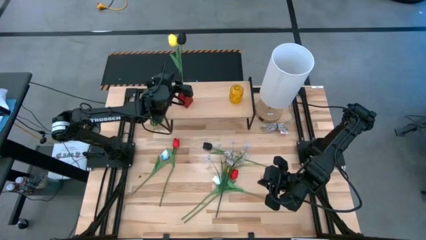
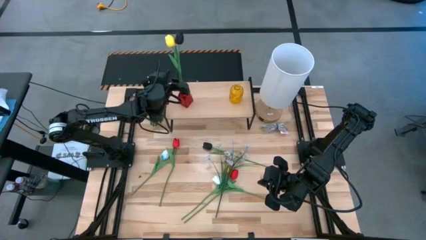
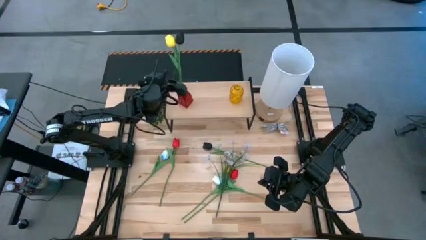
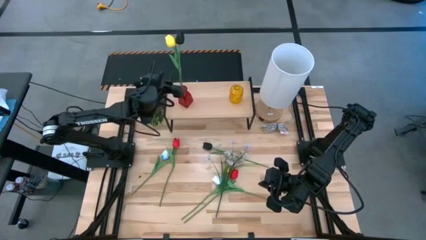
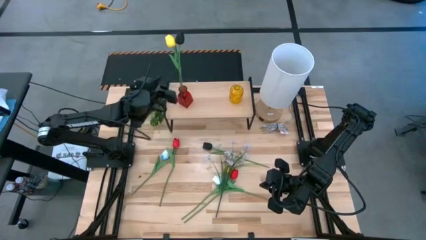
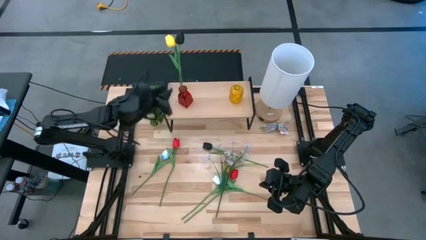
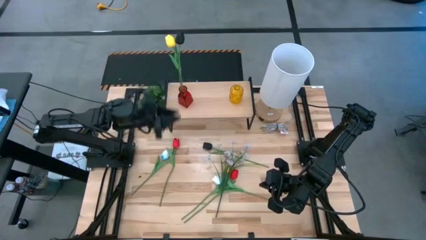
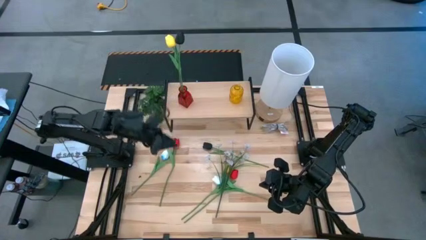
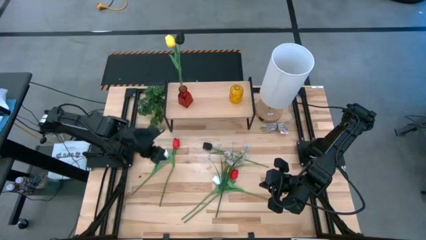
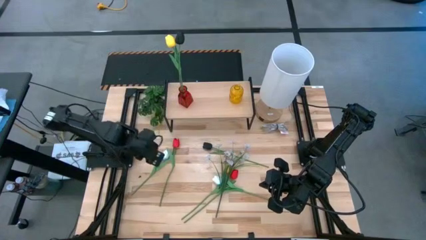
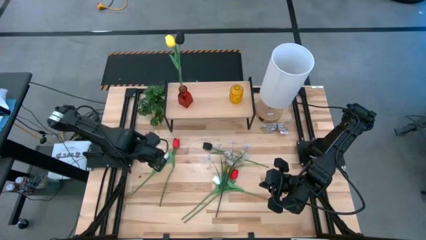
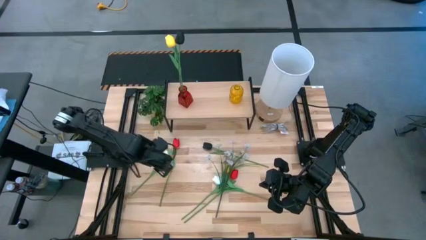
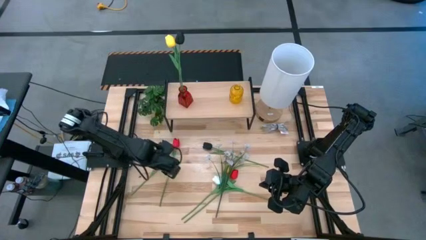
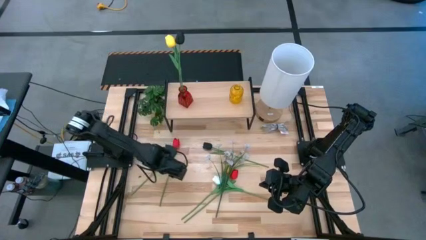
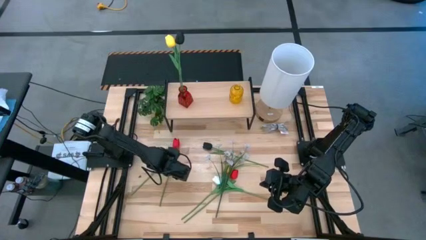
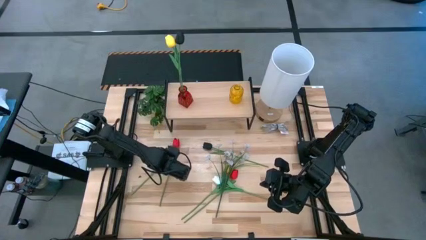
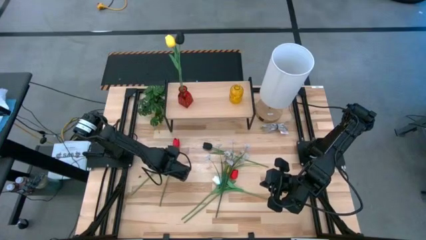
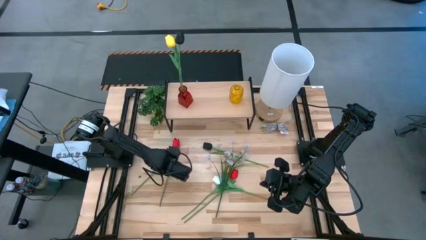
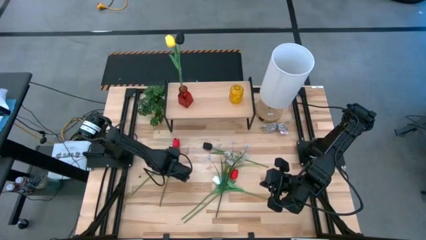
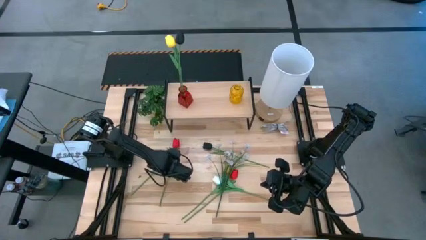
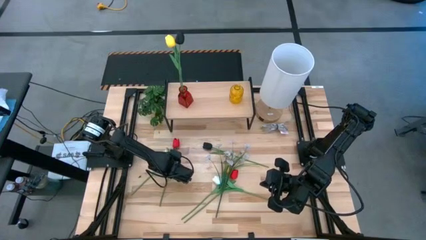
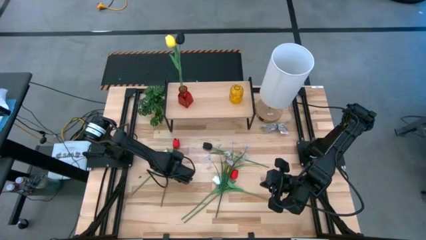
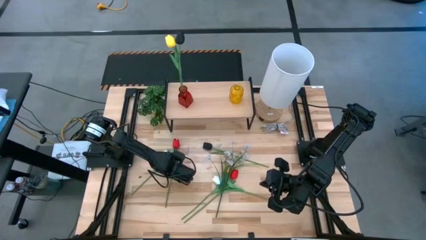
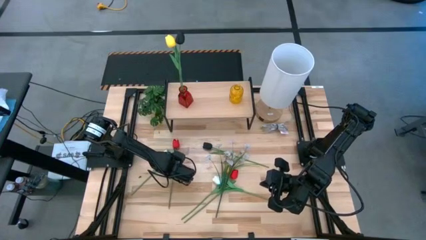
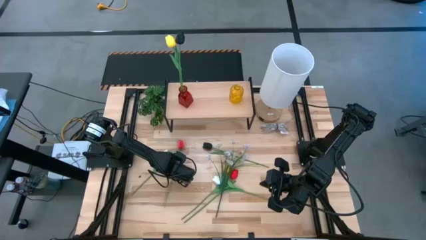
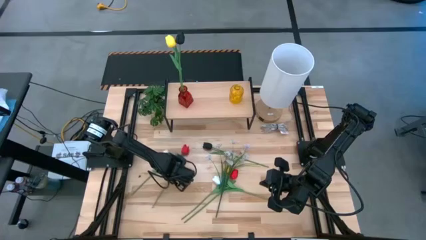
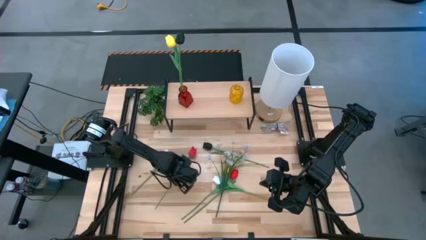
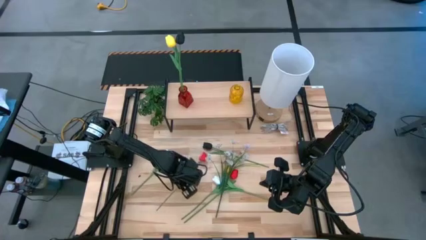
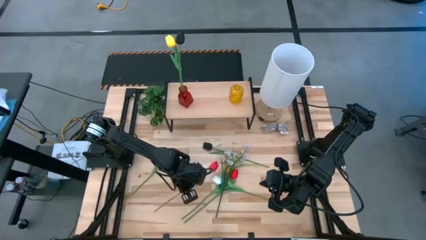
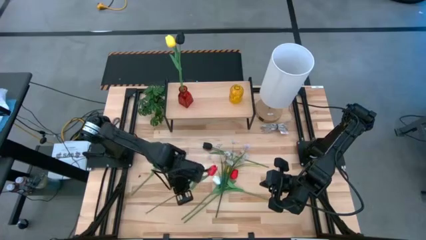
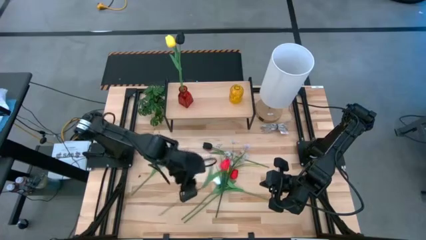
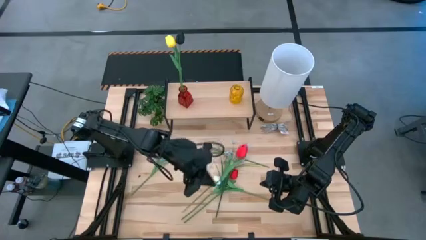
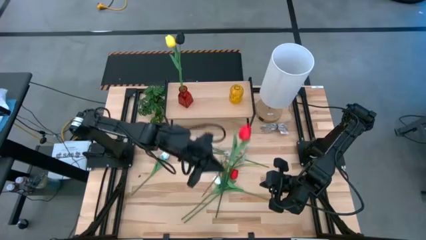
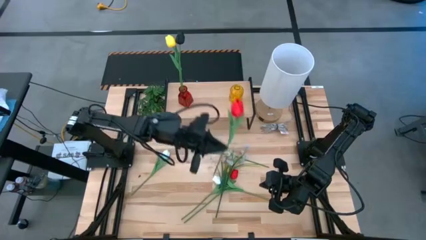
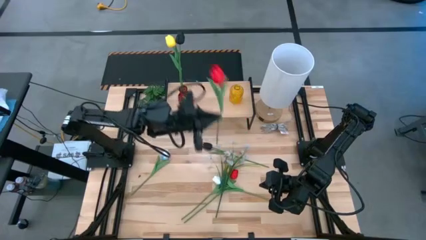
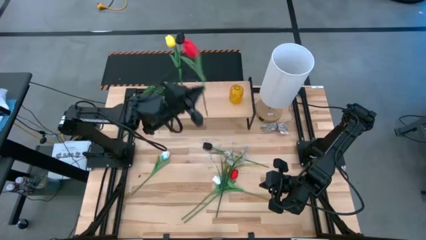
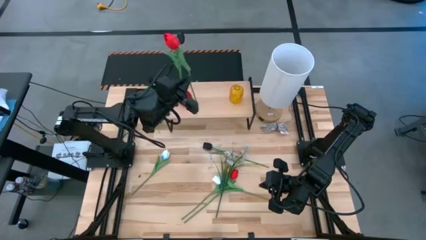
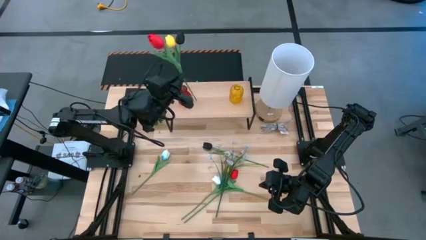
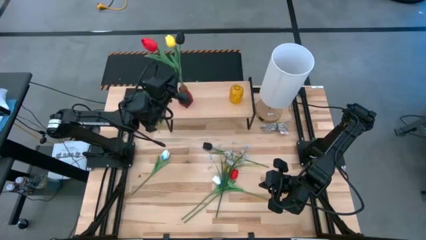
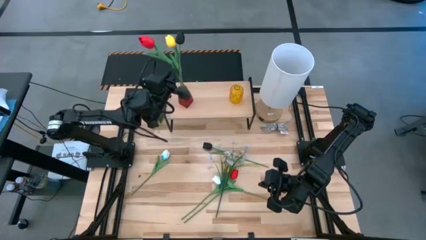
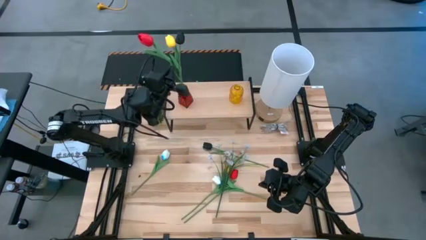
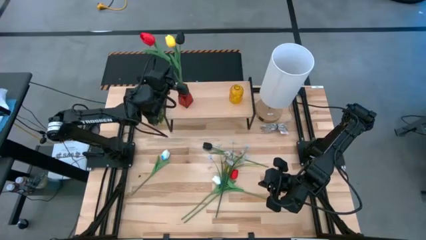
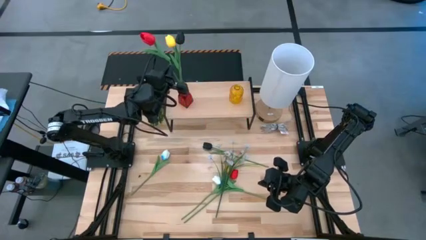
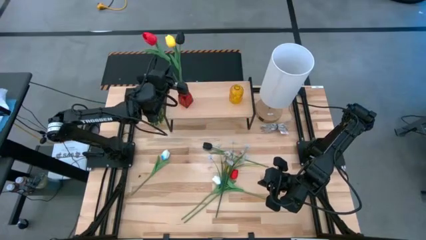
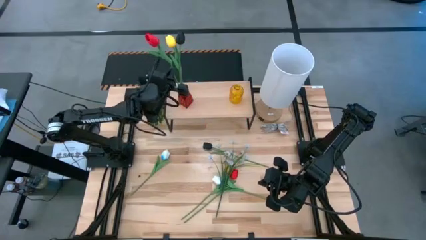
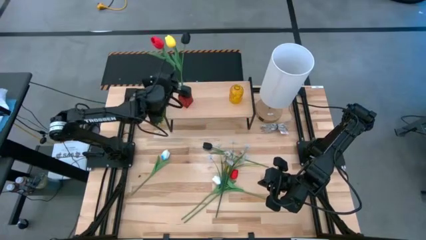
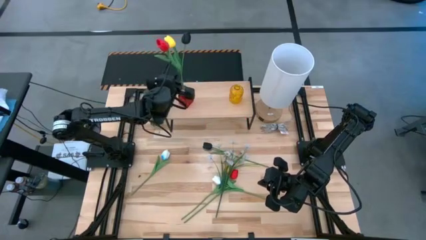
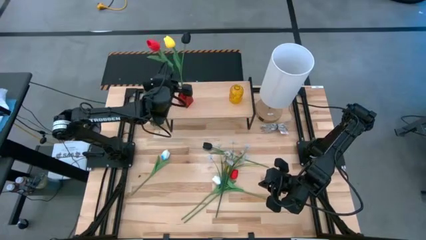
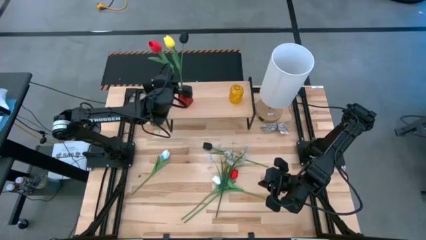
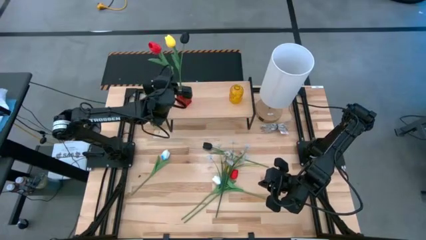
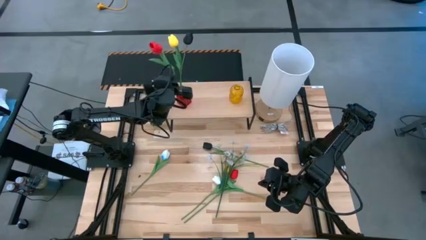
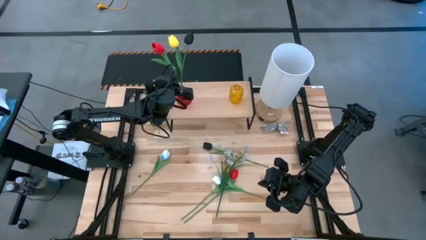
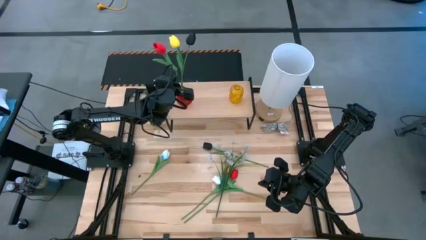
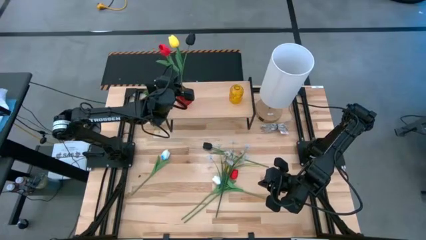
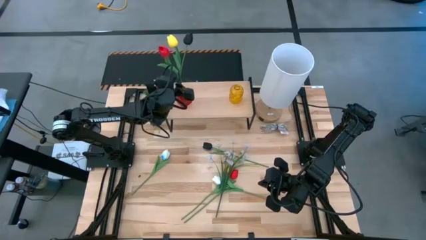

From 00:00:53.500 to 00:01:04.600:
Task: Pick and place flowers into a vace then onto a shelf
Put the left red flower into the red vase on the shelf
